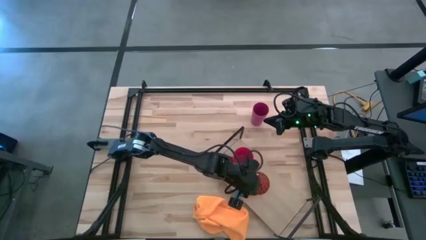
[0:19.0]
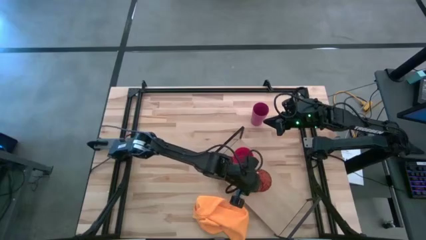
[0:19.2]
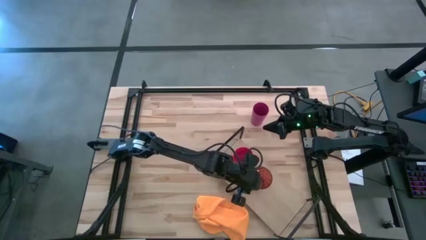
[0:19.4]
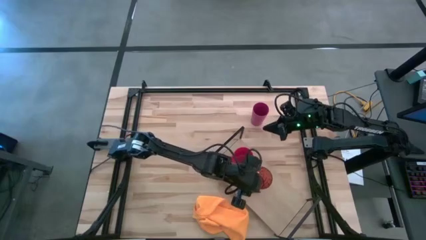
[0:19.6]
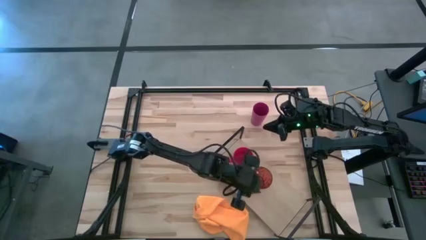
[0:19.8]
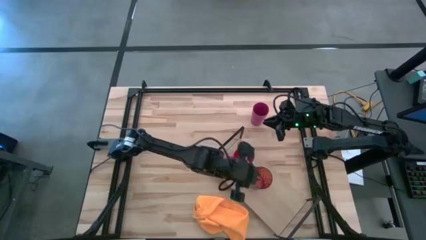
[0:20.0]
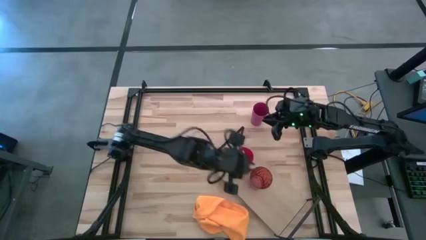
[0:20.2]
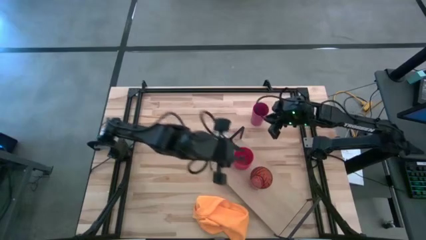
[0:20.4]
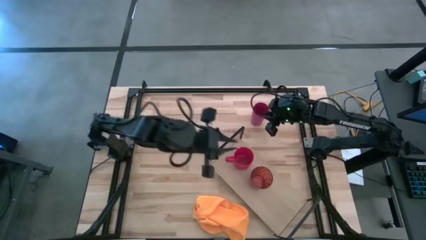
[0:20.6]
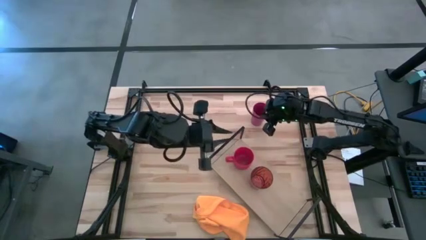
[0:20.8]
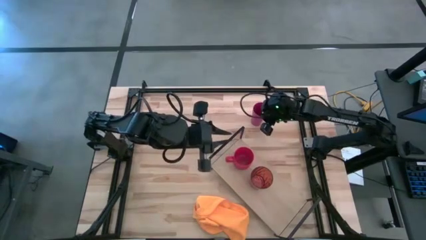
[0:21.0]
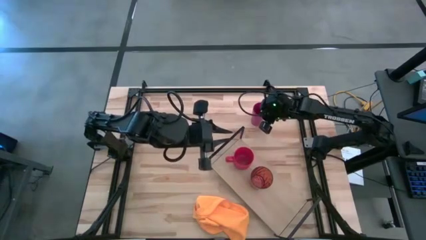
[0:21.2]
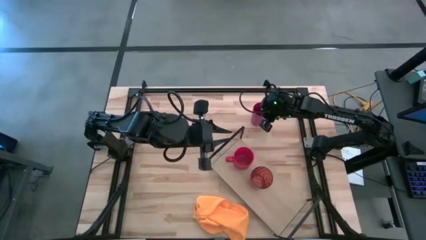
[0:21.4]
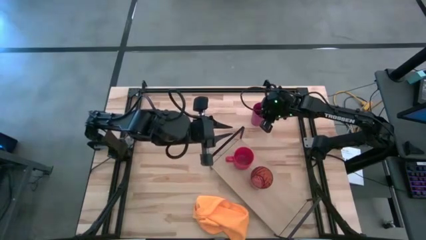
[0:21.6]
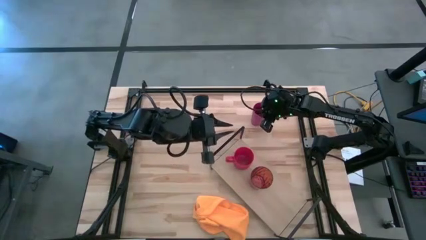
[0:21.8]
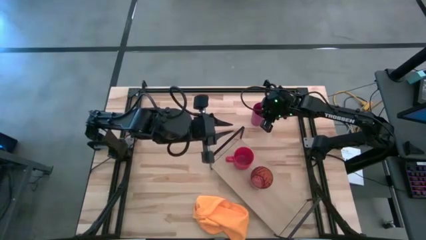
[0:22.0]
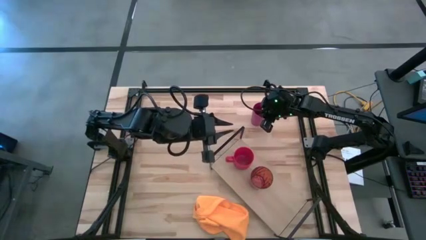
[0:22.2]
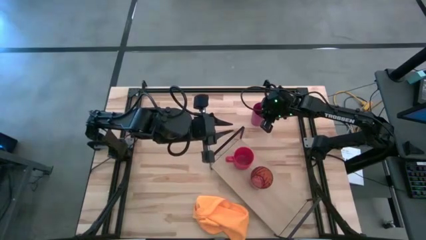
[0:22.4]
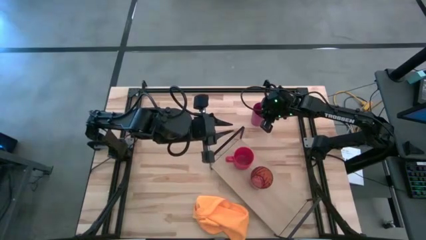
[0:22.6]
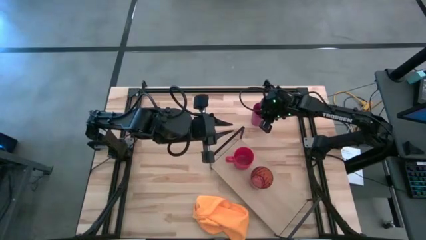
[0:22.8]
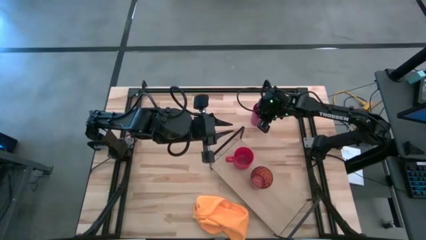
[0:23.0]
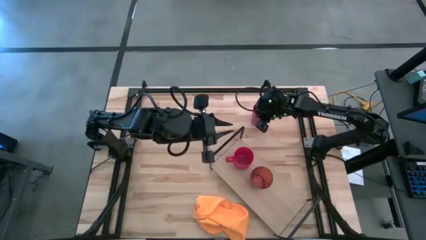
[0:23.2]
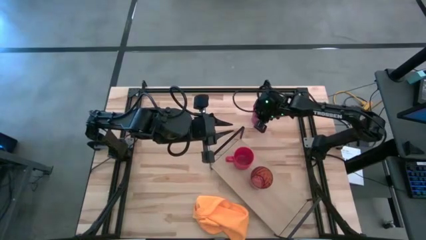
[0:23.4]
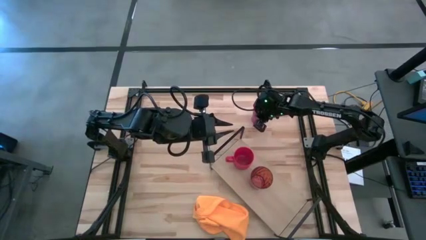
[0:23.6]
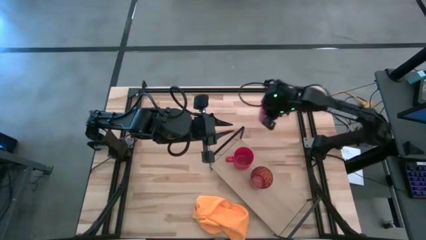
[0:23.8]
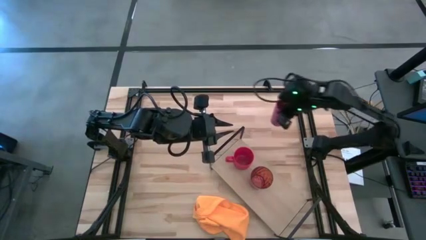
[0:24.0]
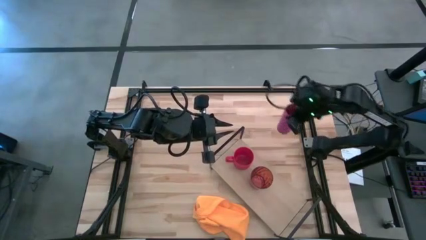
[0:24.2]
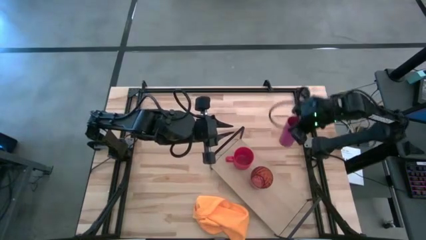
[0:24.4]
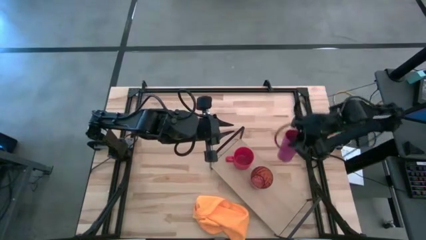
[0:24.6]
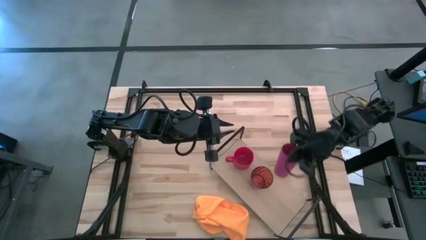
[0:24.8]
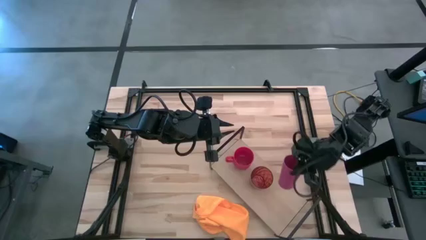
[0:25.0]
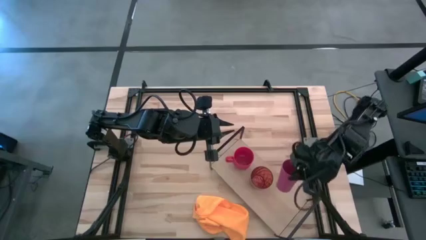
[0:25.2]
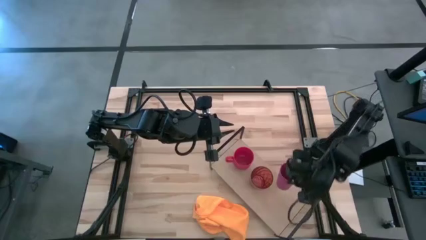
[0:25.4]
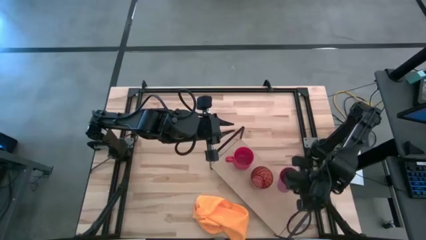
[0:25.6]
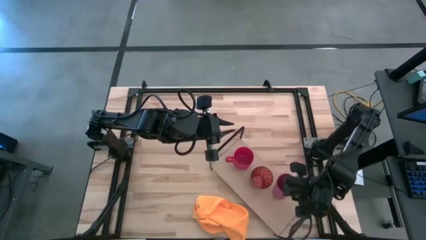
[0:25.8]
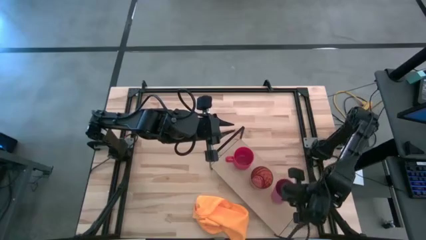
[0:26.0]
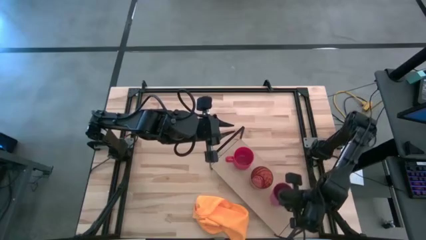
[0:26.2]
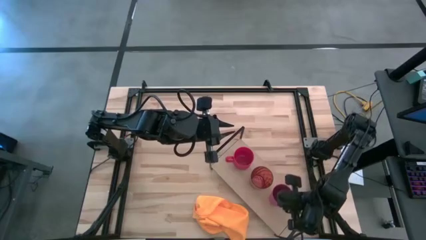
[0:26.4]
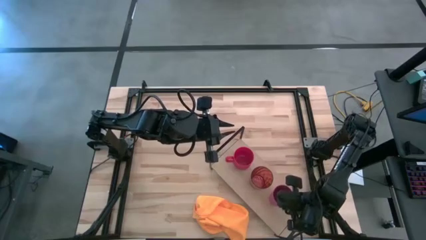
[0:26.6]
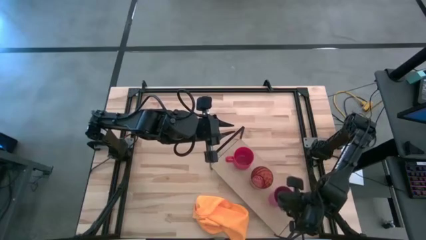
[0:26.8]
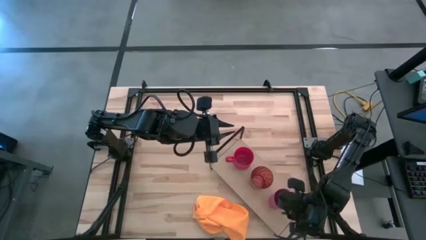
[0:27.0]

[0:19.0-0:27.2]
Task: Stack small to large cups/mugs on shelf
Put the pink cup on the shelf

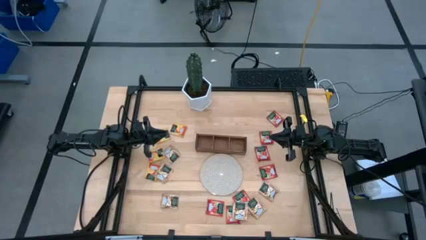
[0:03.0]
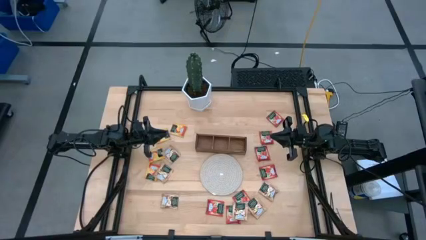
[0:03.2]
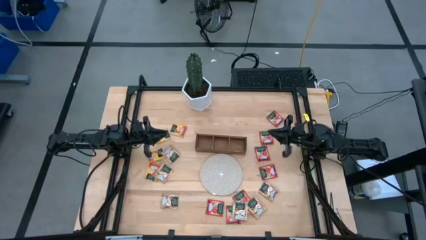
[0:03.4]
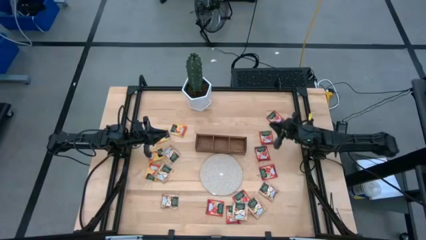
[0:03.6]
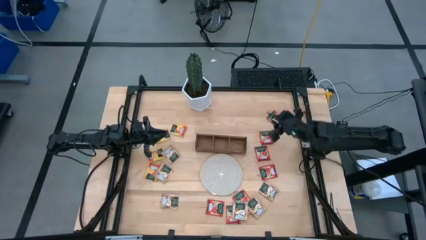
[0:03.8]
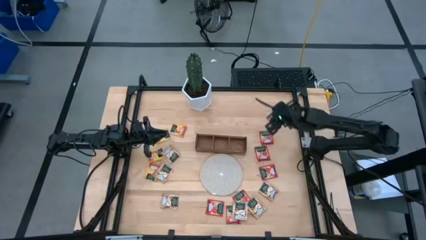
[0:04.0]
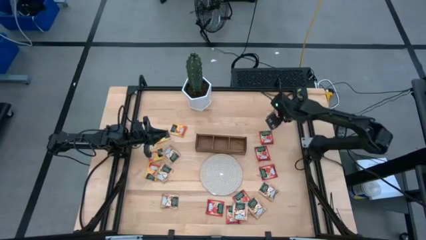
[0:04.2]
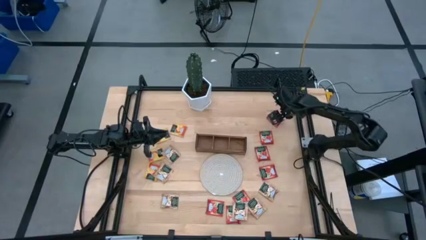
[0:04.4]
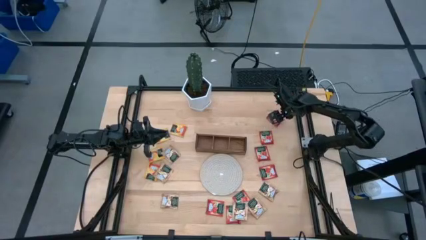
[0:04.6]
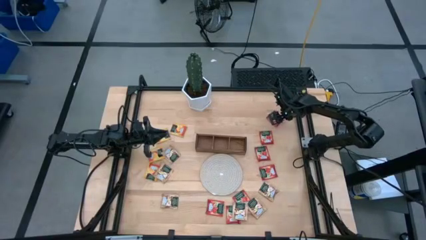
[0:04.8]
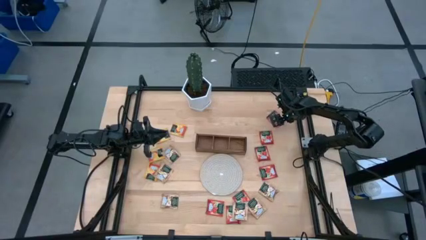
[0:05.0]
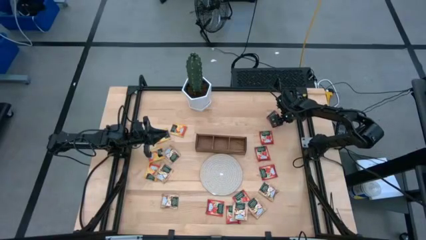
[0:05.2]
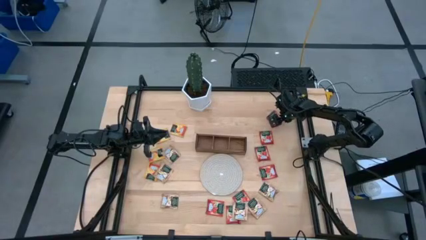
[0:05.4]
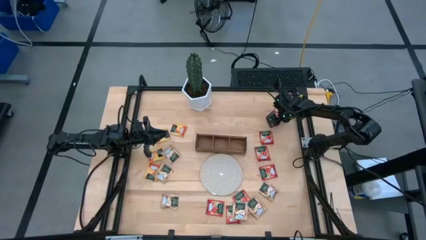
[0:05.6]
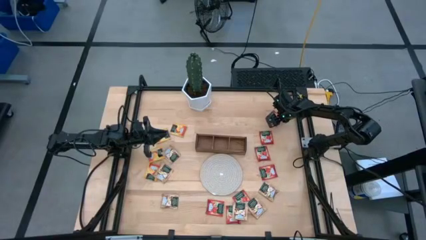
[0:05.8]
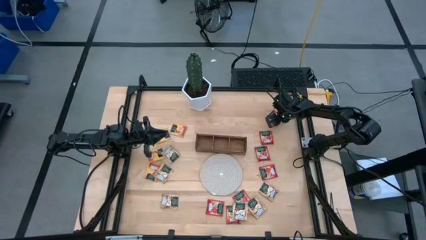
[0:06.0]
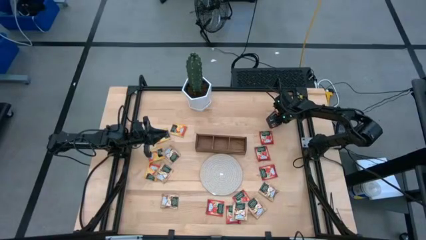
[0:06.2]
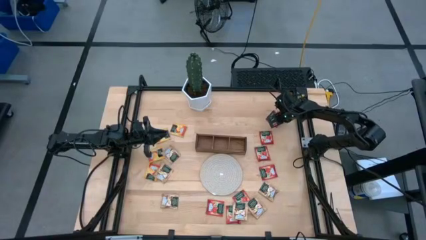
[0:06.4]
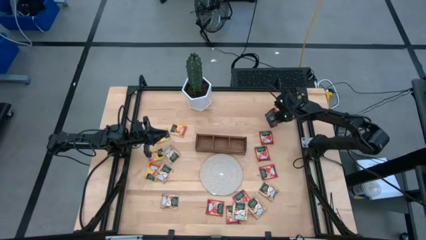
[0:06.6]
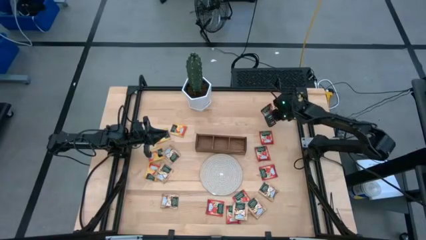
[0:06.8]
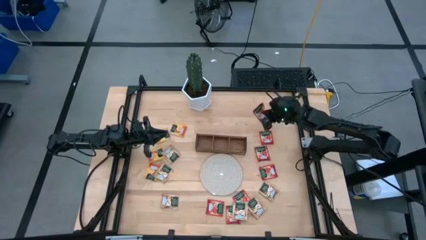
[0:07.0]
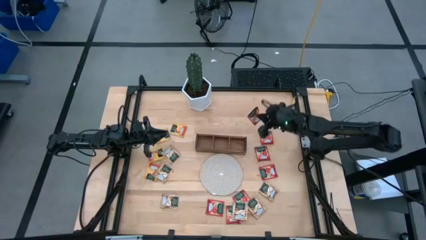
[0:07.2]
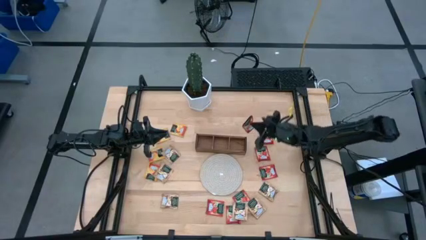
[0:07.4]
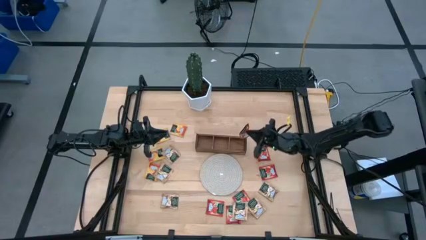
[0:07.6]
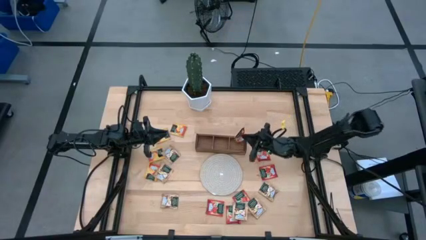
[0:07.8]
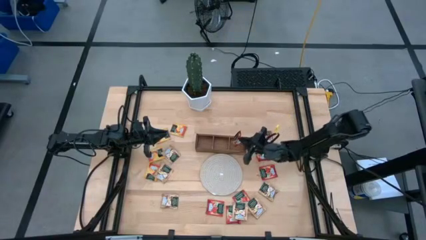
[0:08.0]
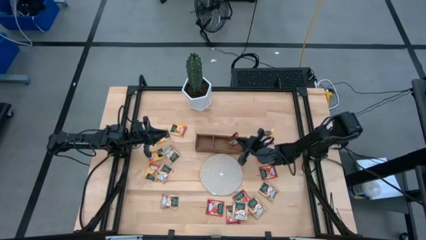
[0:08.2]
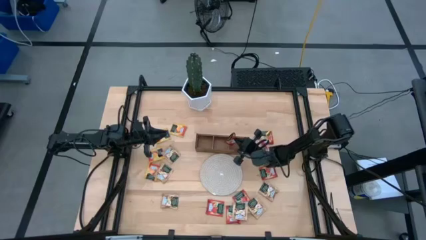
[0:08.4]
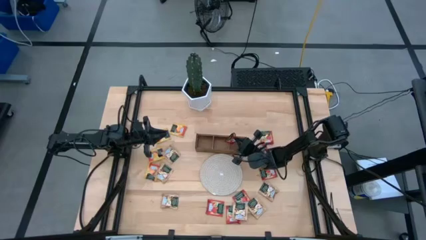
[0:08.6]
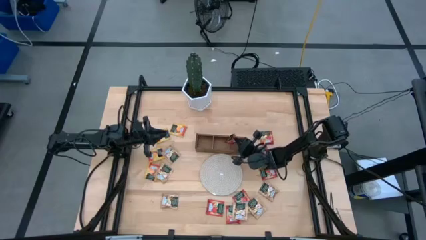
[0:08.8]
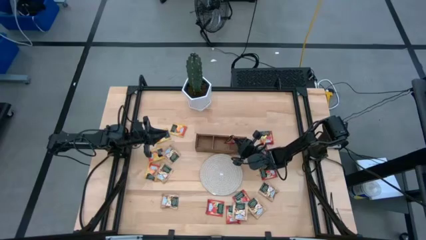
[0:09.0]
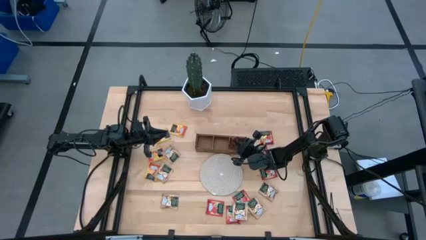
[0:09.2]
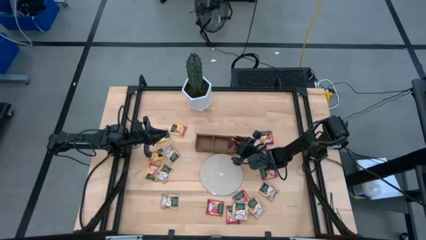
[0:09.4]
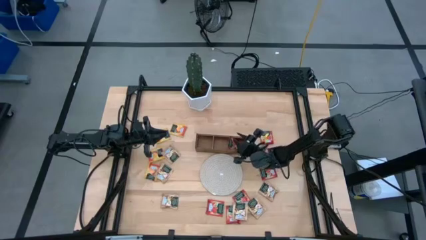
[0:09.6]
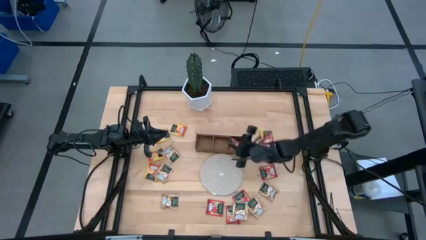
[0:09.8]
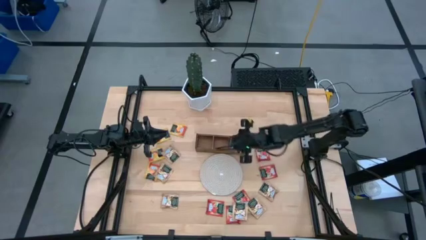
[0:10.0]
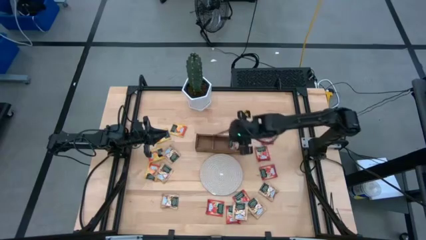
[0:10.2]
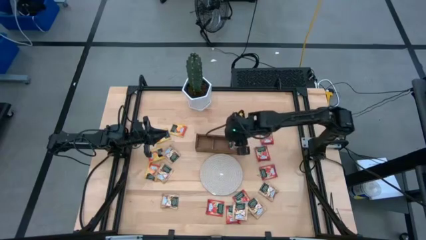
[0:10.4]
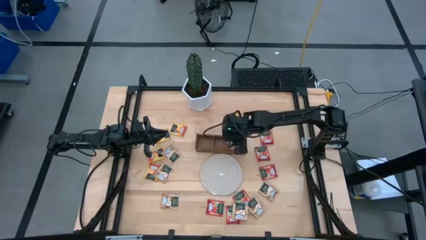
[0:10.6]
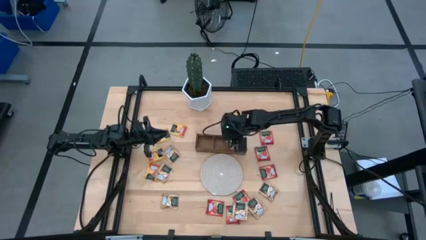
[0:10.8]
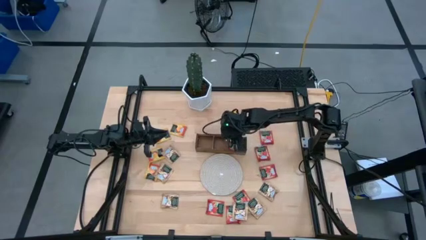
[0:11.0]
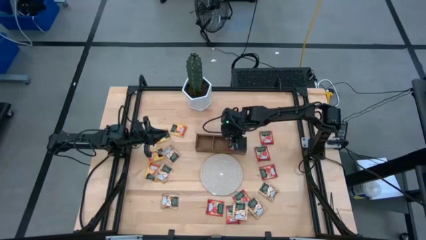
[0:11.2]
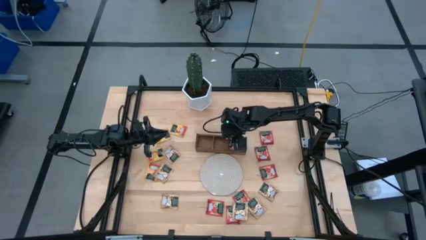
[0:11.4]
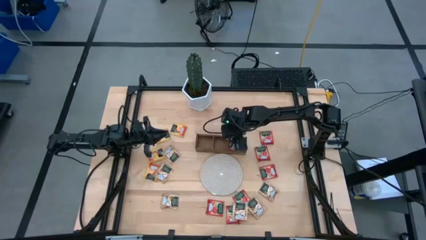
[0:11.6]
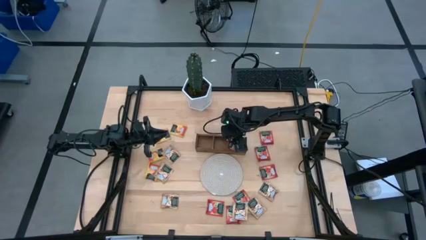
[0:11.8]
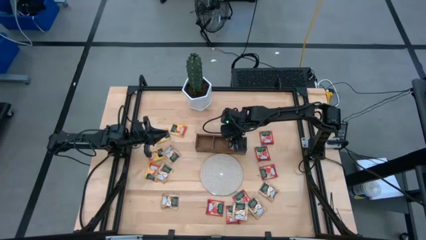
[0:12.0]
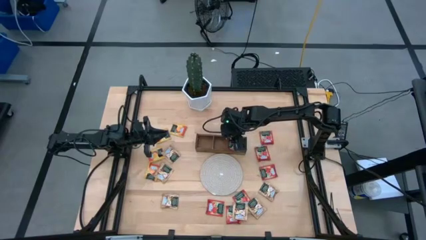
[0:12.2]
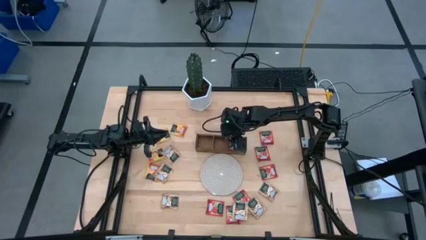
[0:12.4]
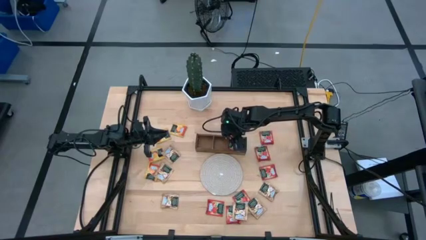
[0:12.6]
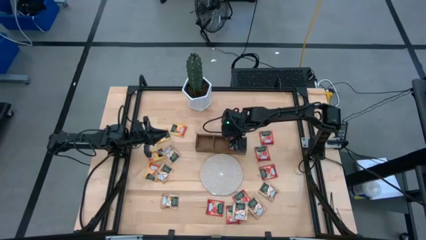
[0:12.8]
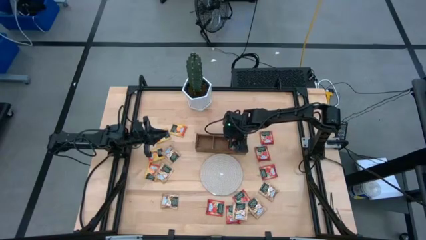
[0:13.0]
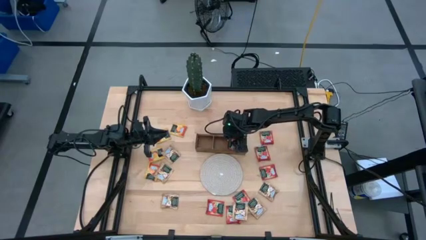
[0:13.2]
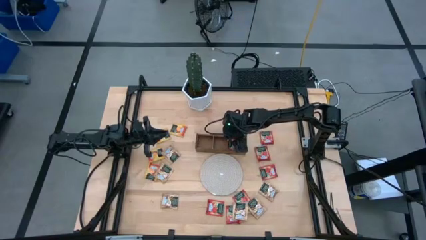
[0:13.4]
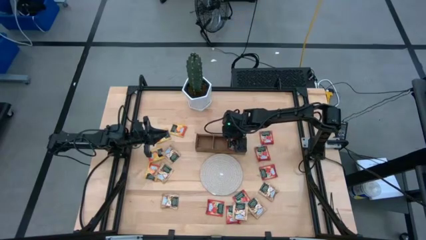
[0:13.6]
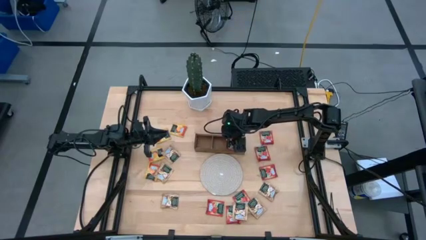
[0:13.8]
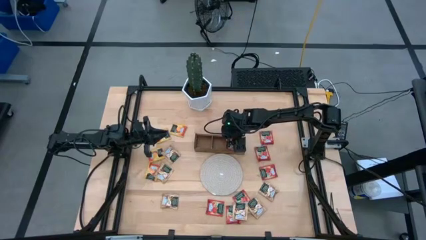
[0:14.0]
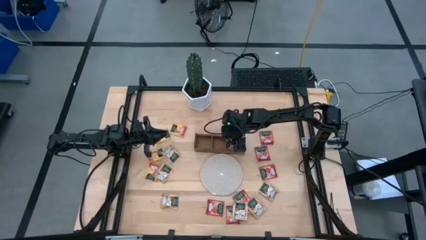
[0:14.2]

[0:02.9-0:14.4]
Task: Pick & Place Tea
Put the red tea bag into the right section of the wooden organizer
